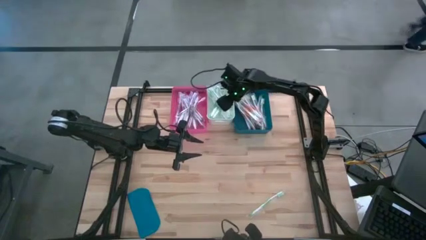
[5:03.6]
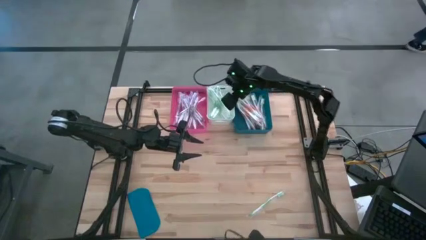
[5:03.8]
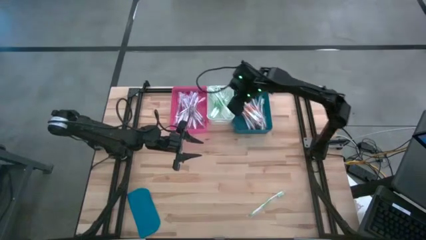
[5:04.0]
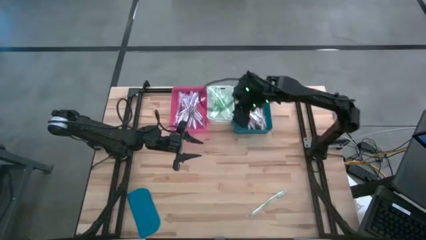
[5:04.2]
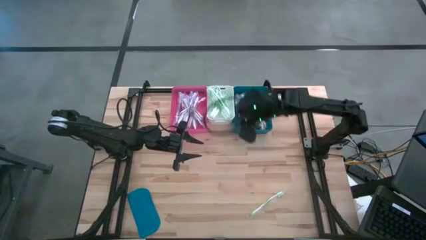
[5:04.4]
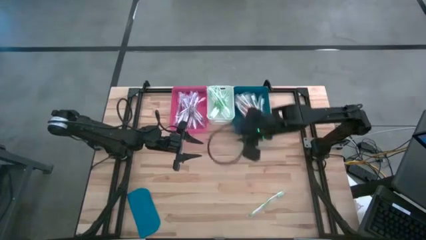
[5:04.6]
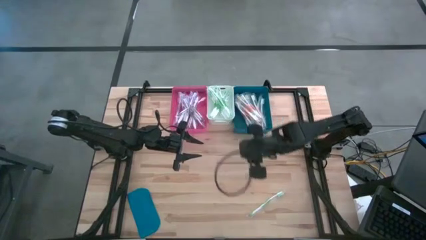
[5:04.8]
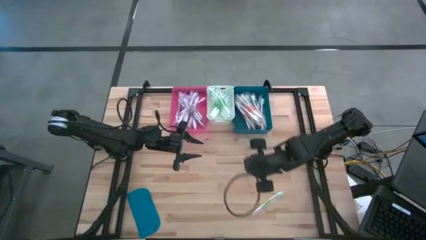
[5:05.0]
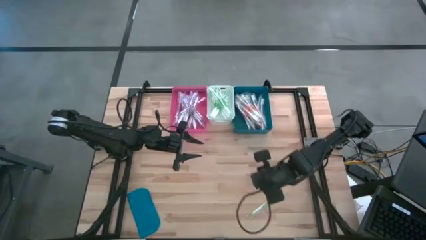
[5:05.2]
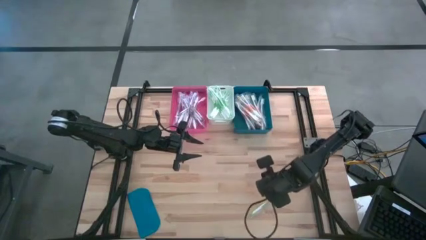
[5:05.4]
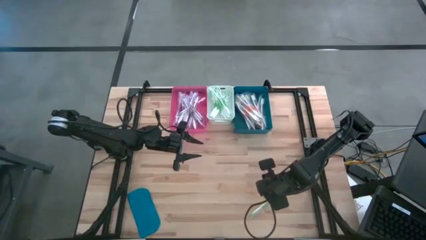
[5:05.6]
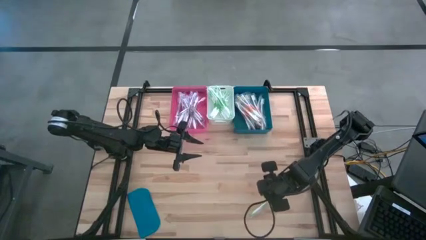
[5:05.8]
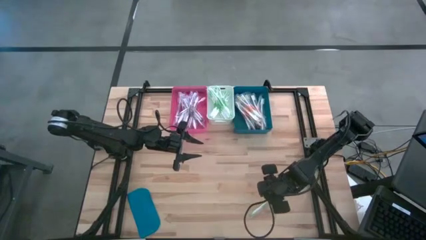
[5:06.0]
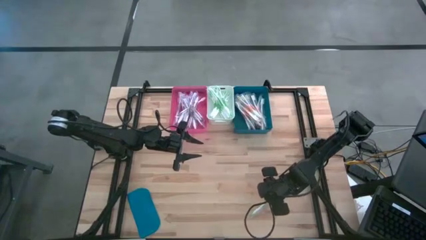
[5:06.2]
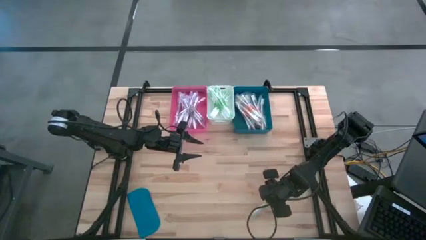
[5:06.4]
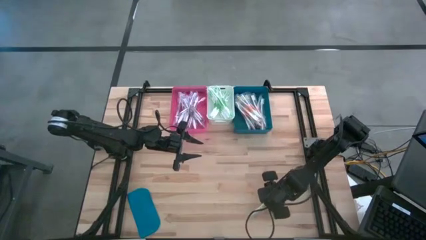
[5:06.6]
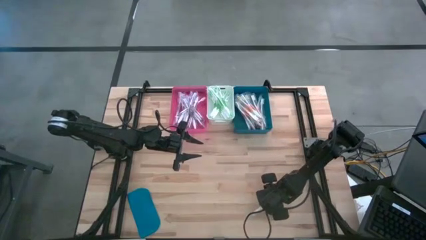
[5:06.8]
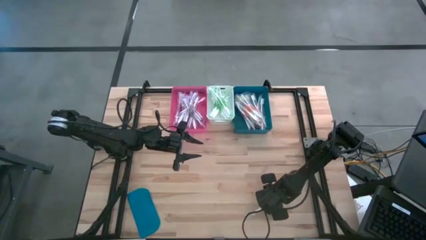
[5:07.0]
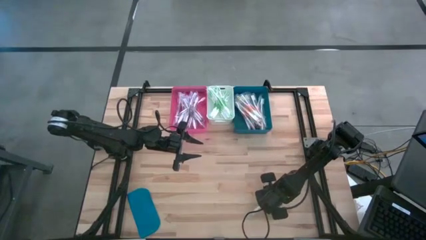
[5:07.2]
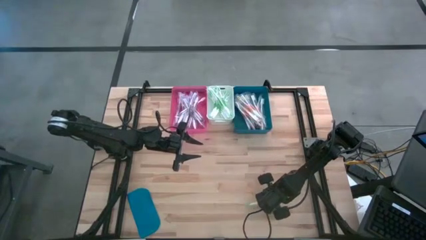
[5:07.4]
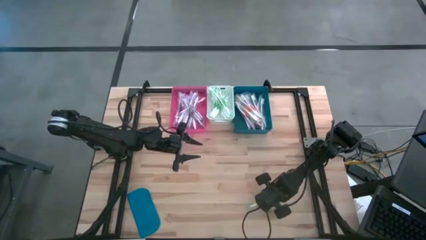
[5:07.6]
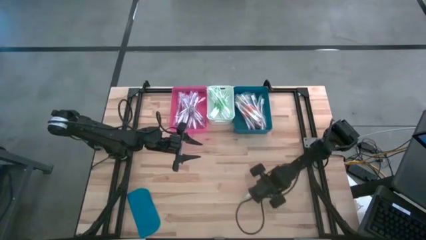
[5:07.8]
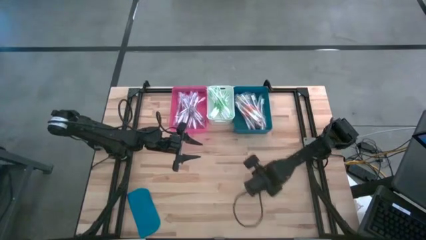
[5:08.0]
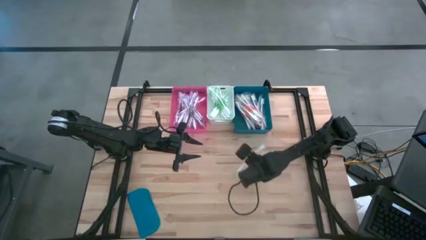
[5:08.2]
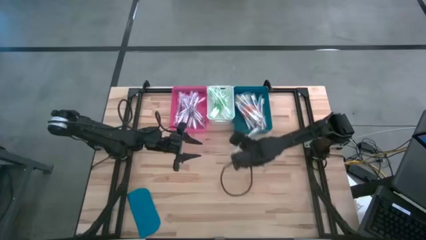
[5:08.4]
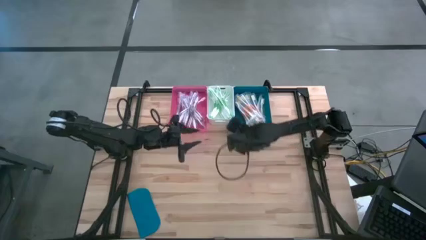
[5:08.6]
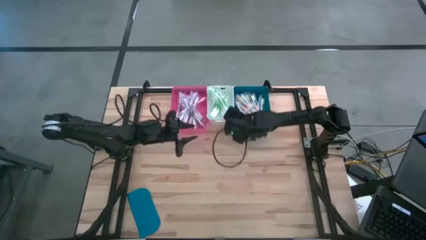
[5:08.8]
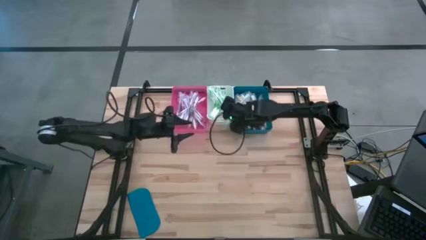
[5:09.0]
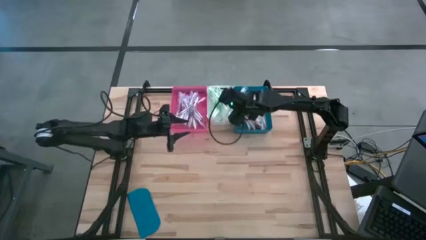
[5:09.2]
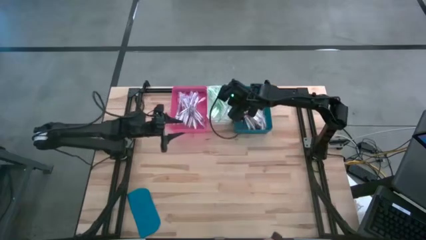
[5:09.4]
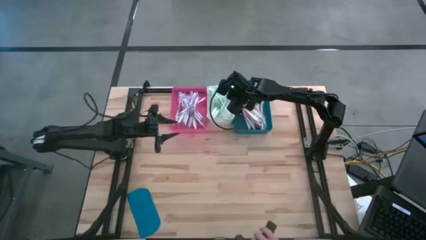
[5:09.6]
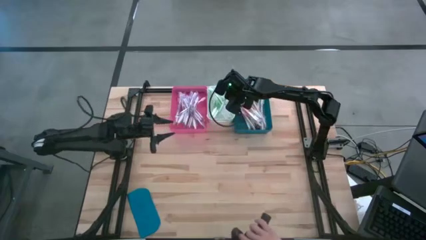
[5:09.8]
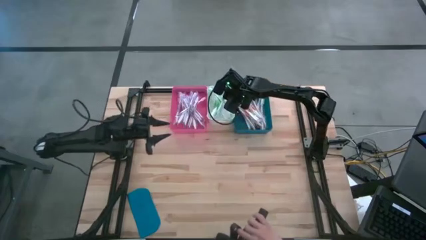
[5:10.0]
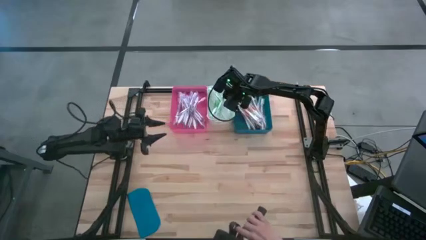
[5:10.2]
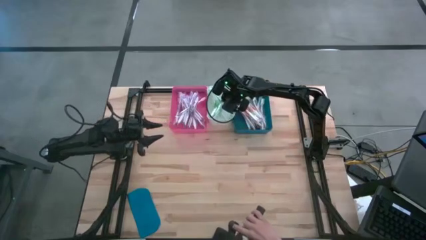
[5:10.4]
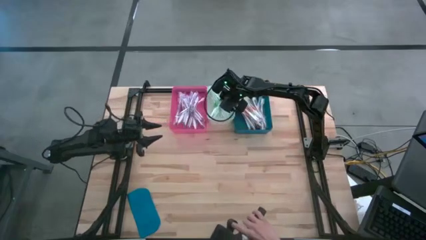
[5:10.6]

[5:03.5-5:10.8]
Task: Pick & Place Toothbrushes
Put the green toothbrush into the white bin

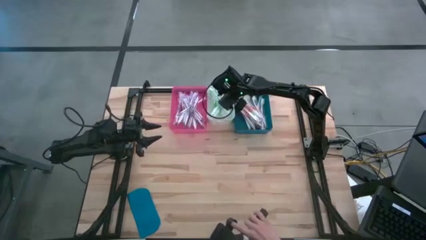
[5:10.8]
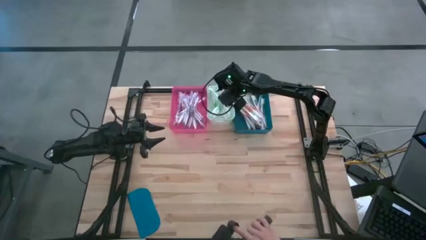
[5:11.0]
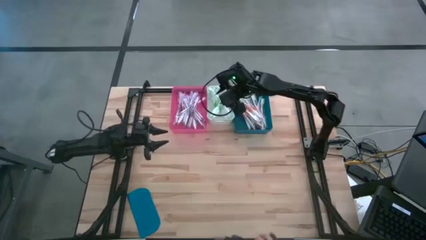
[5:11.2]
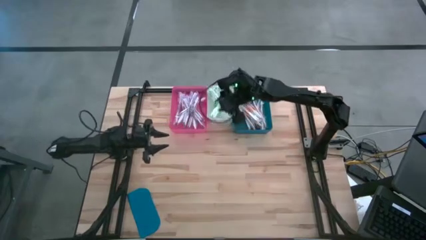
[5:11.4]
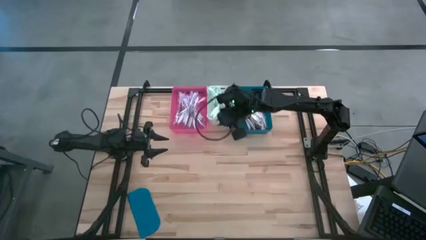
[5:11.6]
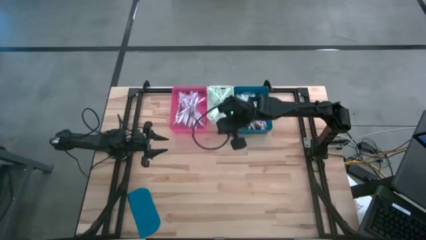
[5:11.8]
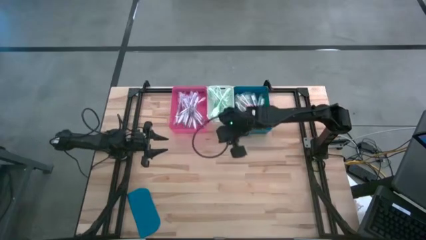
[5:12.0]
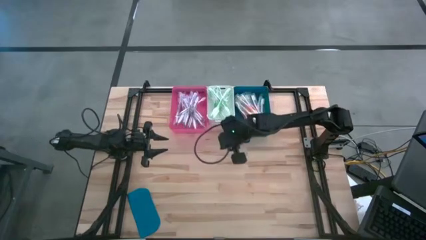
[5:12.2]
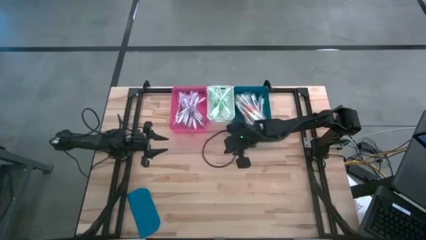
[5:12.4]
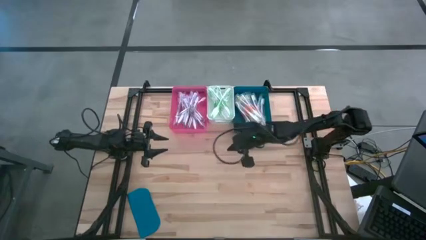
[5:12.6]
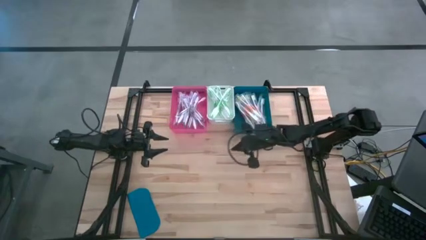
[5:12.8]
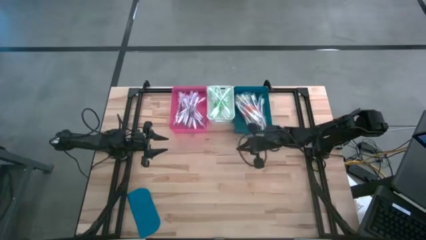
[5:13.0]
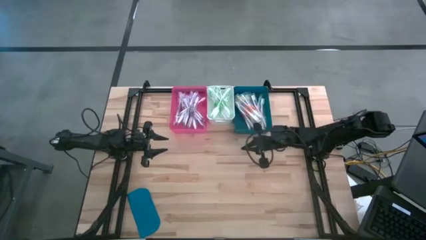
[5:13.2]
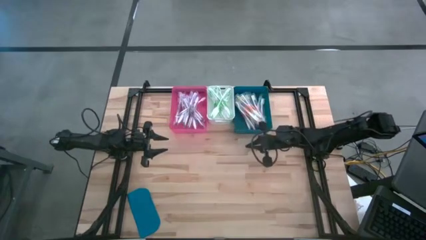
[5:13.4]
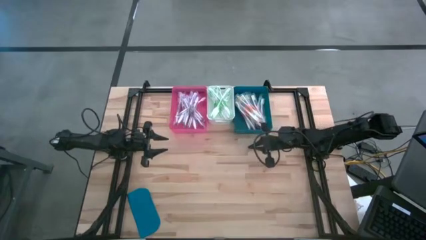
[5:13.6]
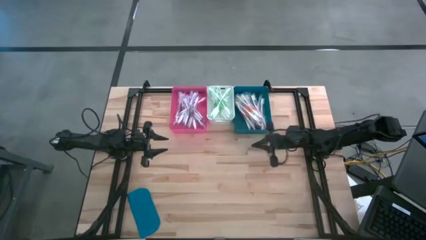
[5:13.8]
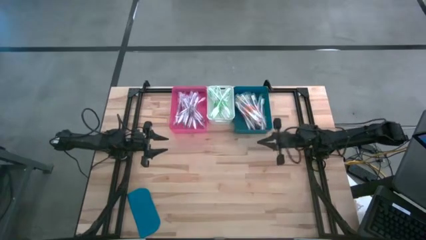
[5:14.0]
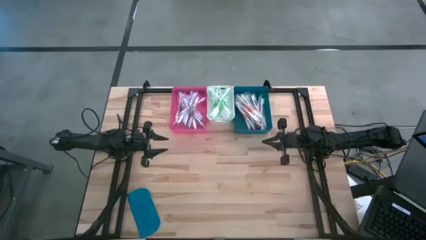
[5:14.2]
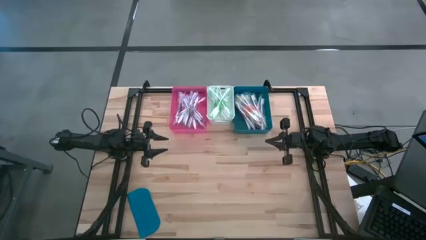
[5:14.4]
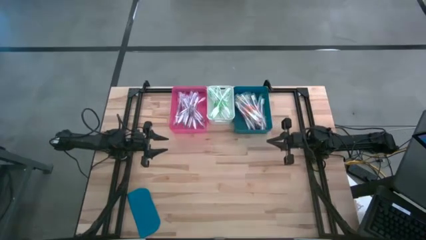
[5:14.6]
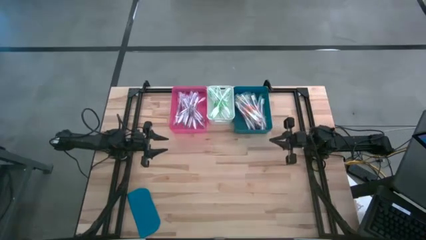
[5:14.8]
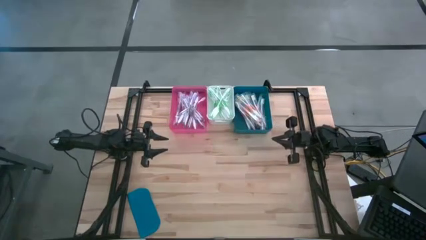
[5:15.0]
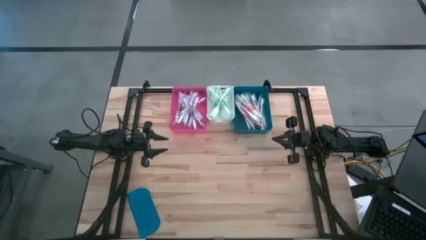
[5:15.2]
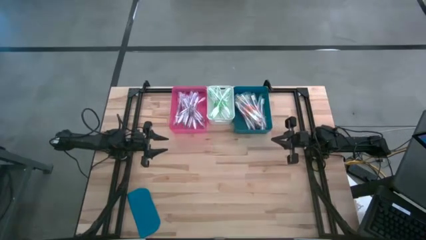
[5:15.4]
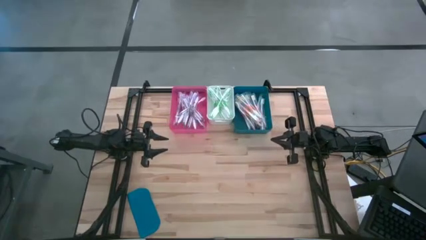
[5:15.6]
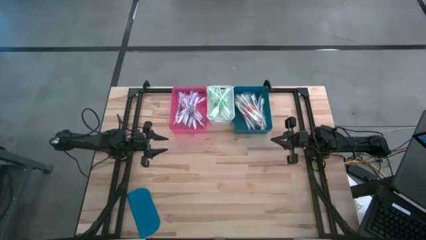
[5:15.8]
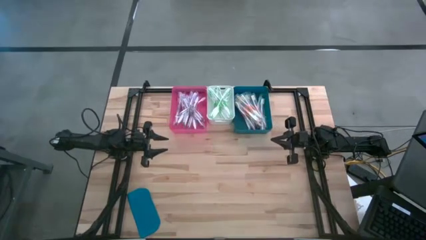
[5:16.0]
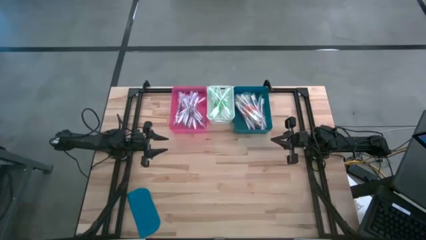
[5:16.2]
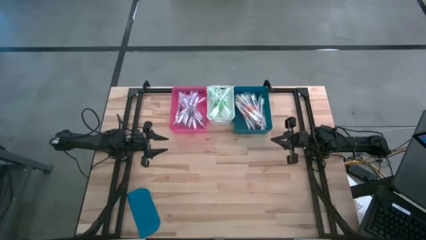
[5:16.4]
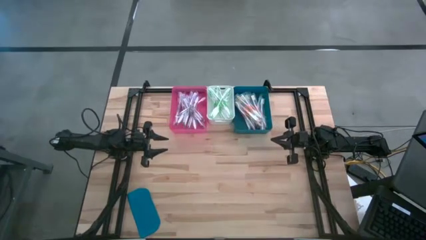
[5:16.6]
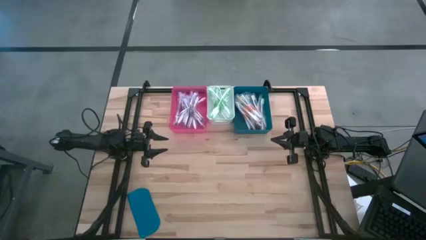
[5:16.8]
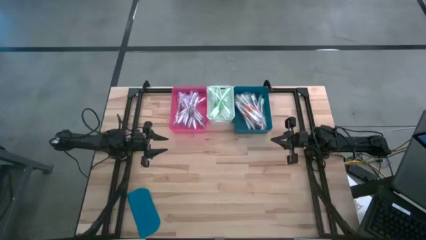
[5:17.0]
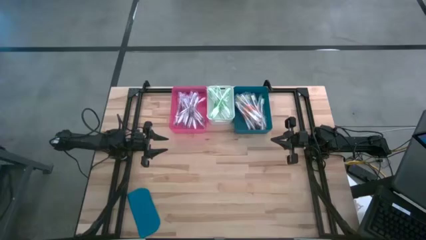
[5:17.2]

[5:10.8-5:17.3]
Return to Home Position
